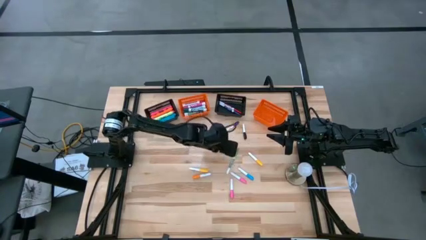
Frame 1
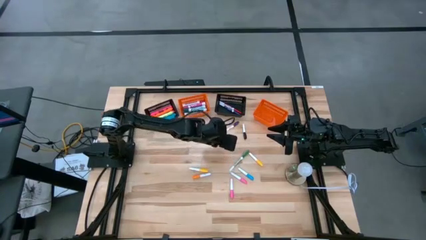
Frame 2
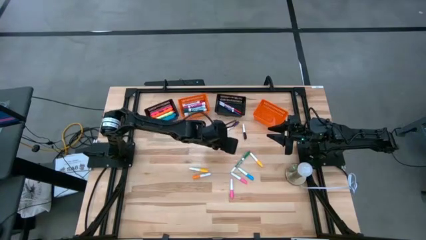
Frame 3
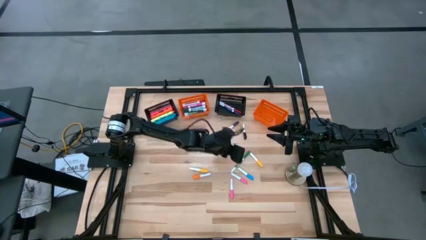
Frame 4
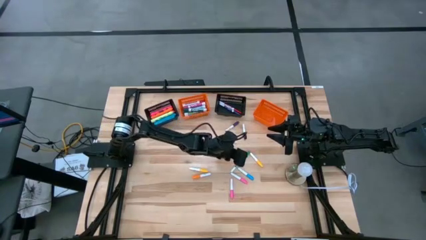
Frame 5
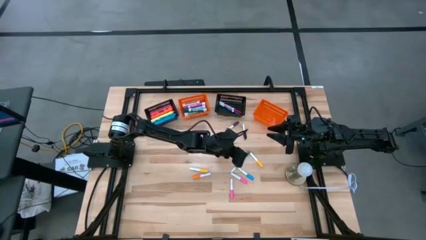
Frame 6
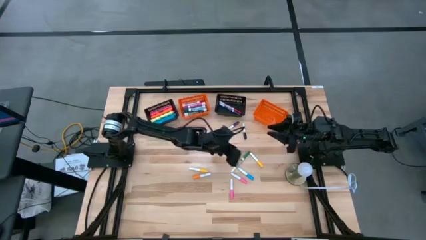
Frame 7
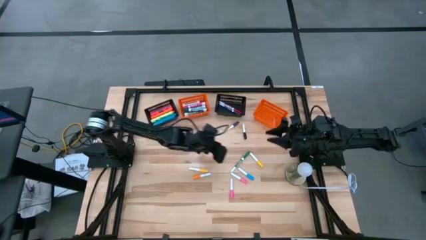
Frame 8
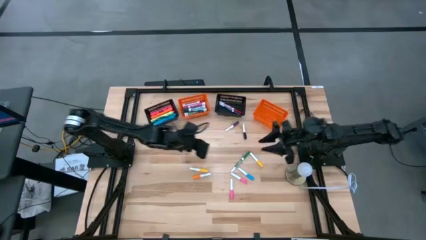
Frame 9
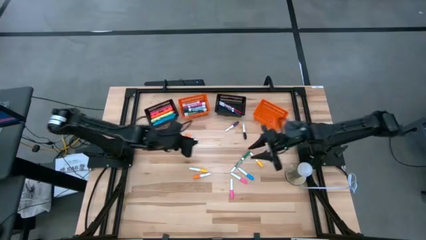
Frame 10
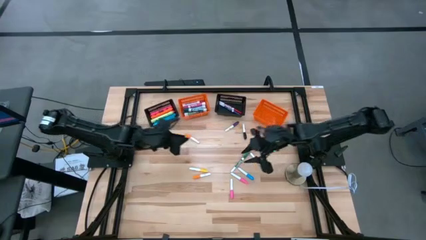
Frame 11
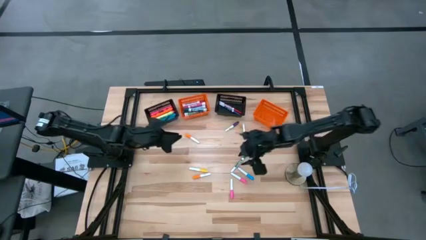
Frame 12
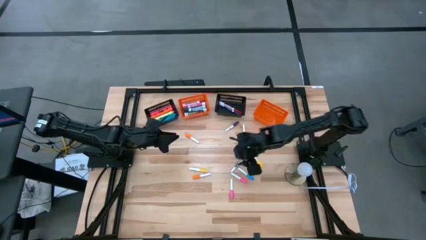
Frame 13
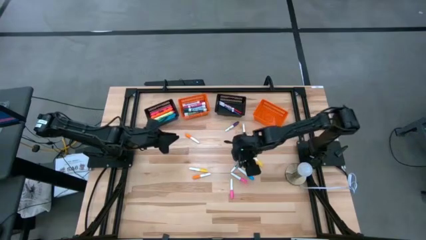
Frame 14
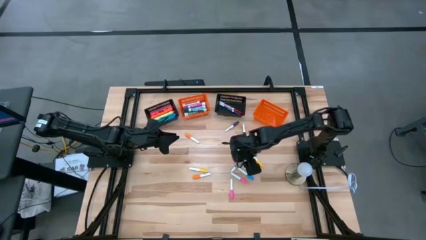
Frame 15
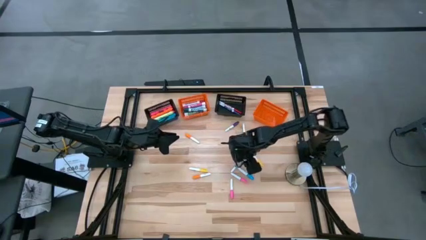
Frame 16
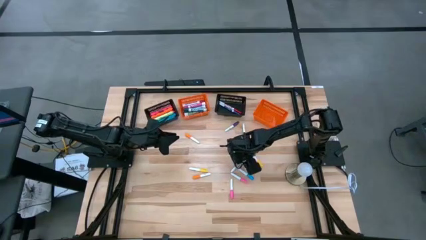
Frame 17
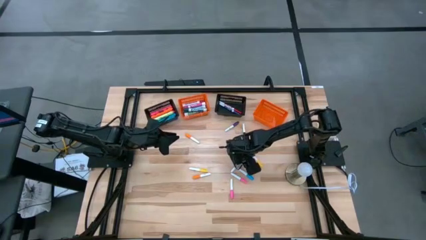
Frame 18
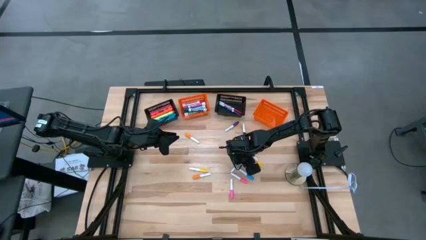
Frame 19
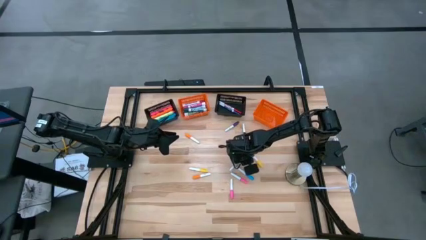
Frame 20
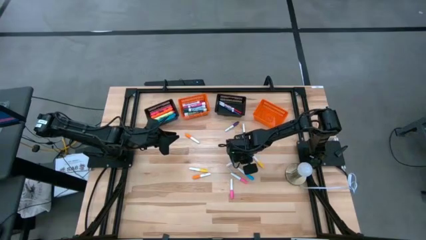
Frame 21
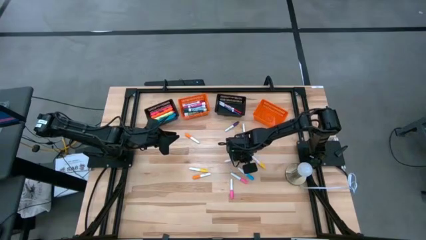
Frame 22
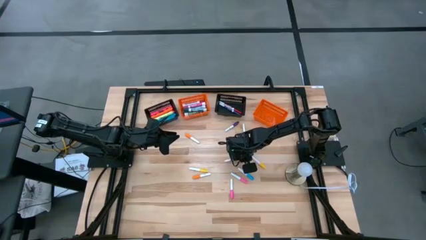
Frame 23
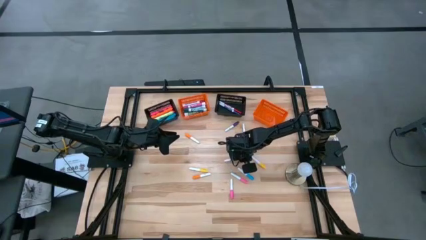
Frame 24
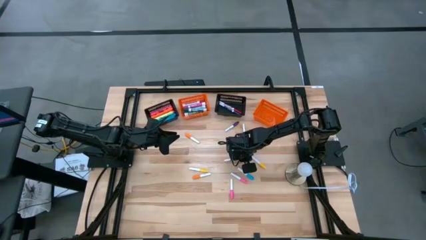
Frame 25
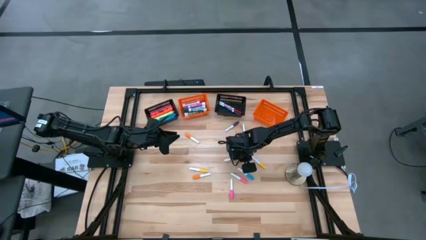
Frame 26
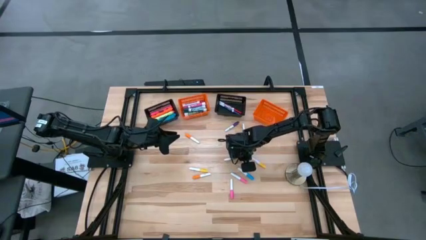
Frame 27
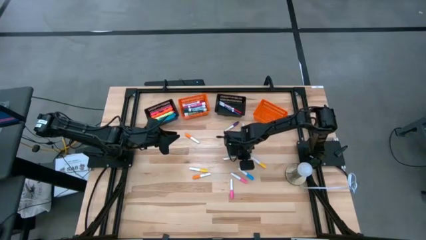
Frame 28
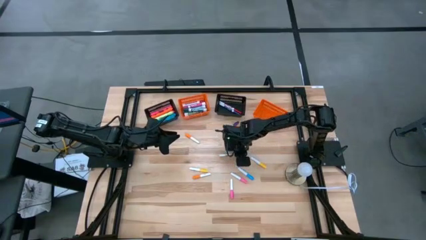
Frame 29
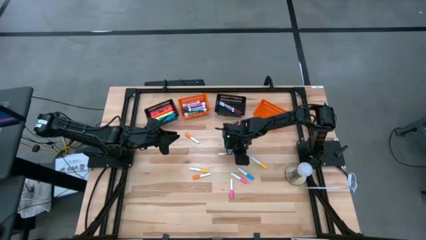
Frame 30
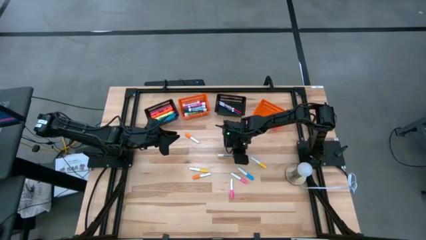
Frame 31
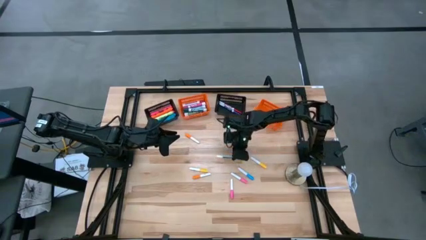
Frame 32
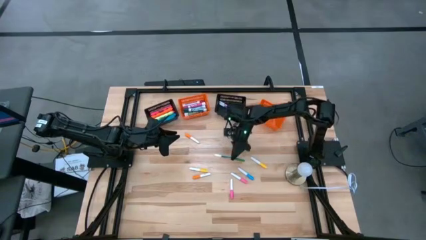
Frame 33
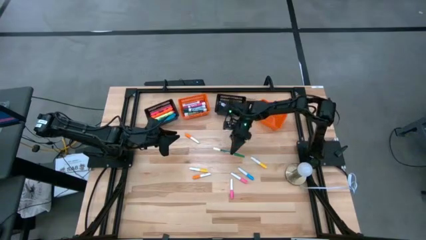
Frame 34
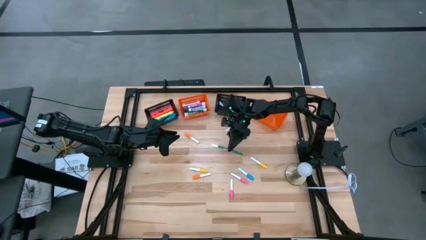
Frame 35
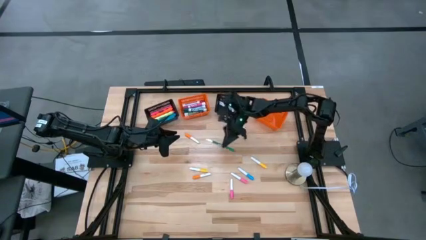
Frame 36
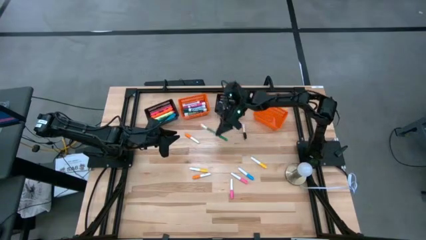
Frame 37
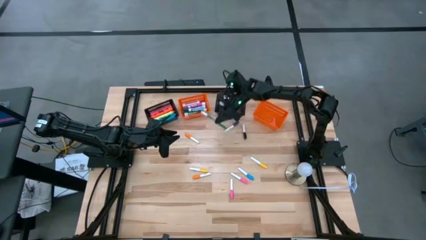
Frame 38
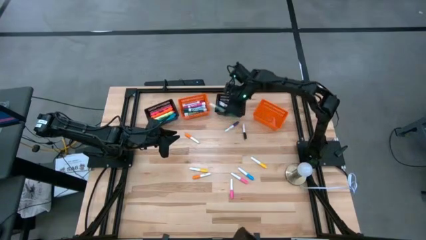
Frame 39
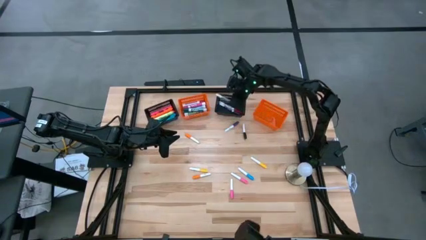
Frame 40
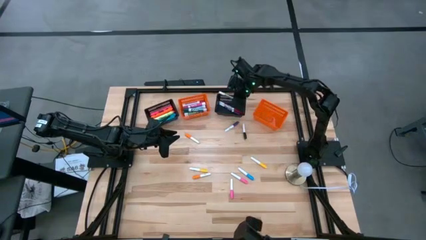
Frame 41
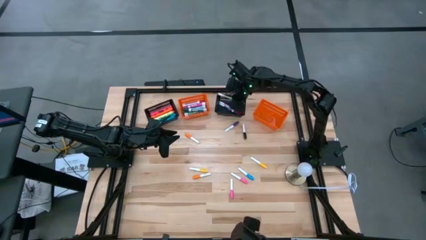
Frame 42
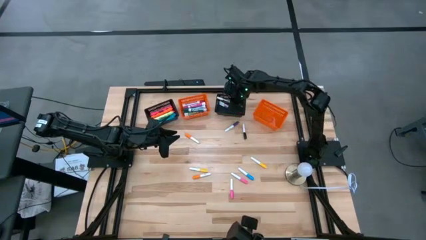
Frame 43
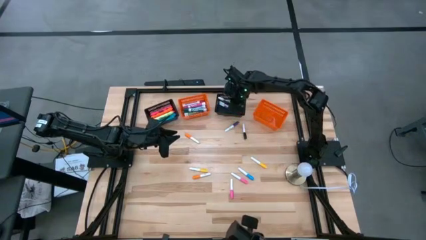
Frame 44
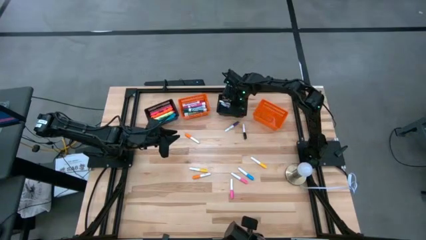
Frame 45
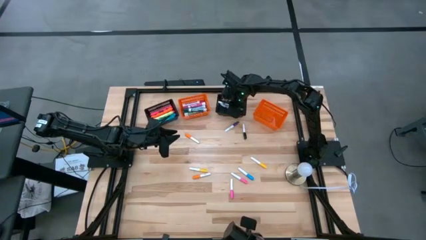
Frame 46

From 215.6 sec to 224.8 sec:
Task: Pick & Place Markers
Put the green small marker pen into the right black bin

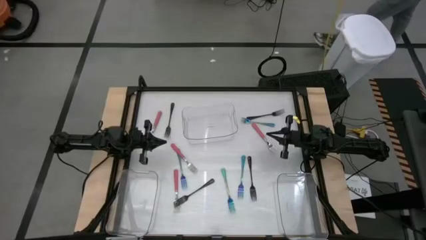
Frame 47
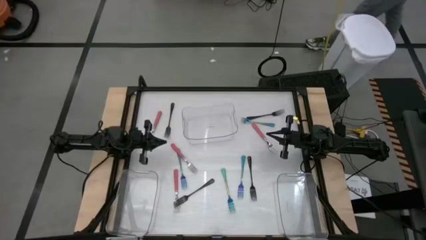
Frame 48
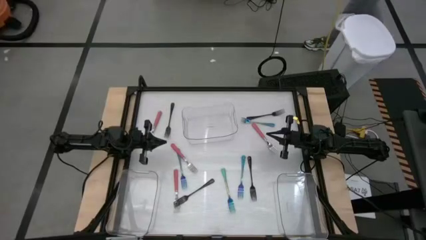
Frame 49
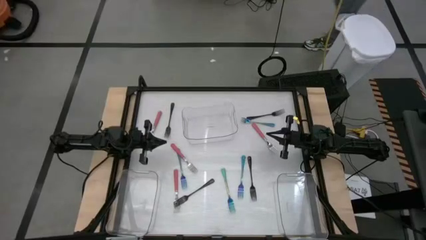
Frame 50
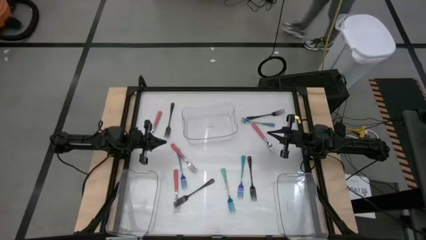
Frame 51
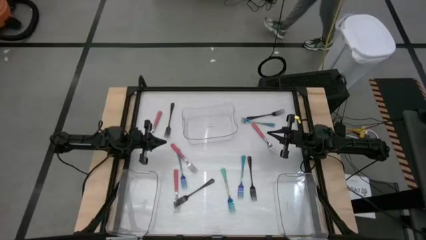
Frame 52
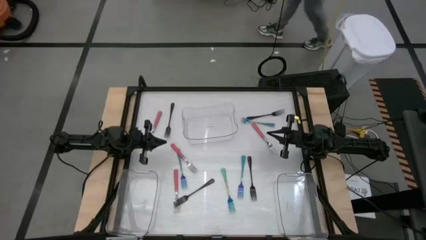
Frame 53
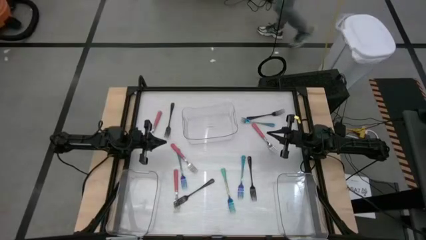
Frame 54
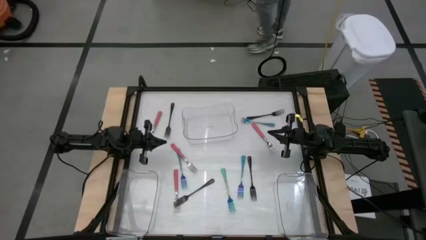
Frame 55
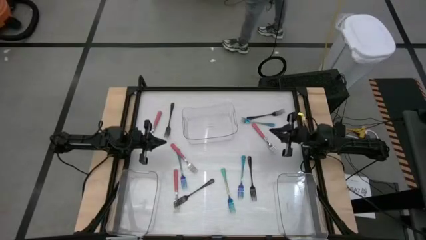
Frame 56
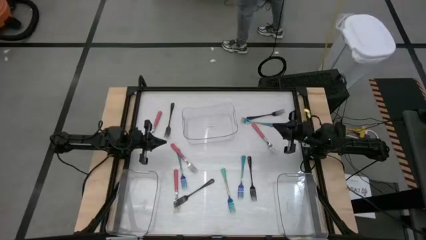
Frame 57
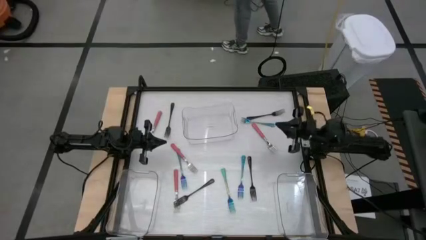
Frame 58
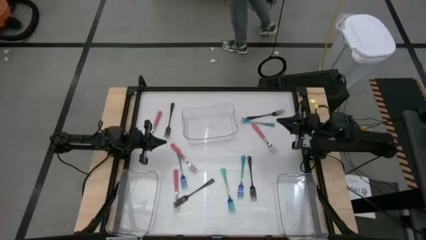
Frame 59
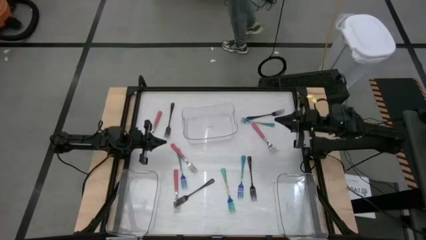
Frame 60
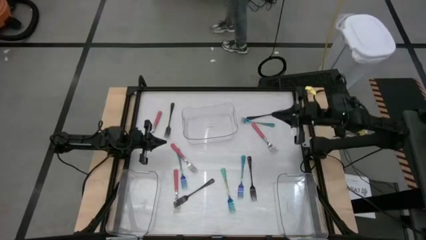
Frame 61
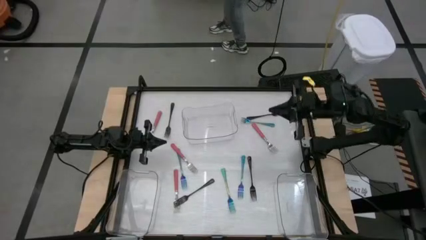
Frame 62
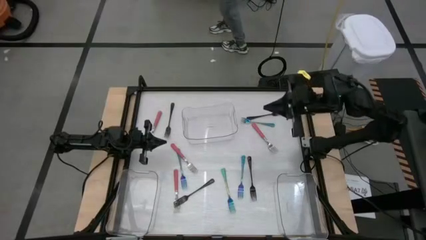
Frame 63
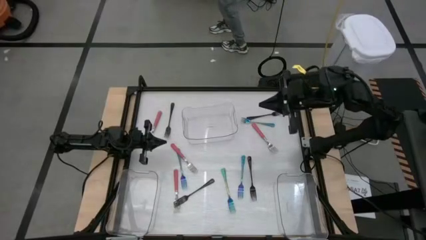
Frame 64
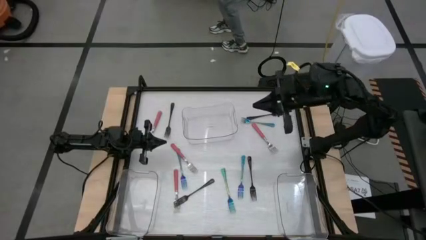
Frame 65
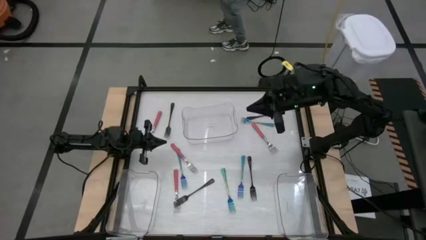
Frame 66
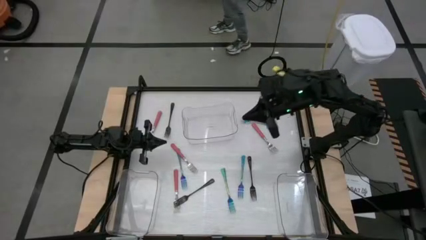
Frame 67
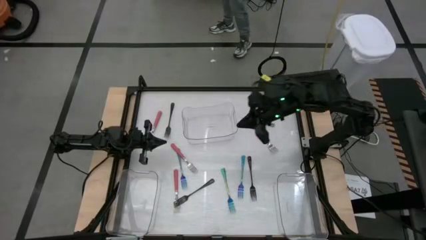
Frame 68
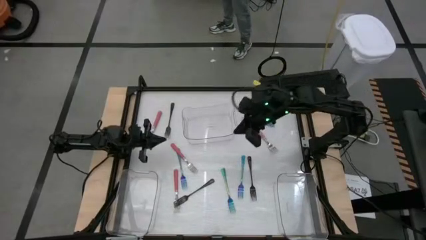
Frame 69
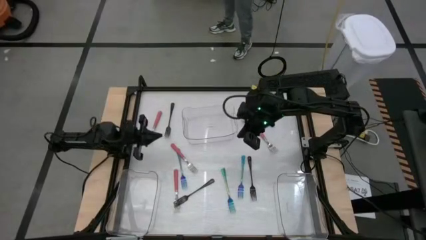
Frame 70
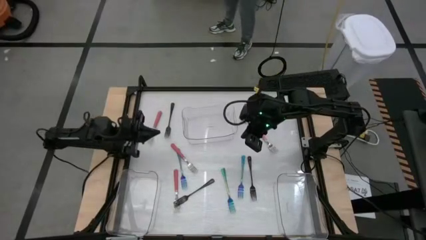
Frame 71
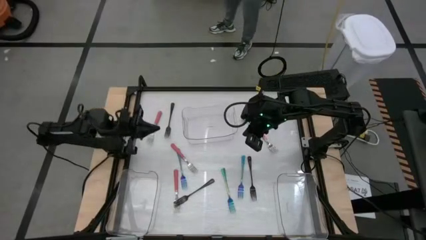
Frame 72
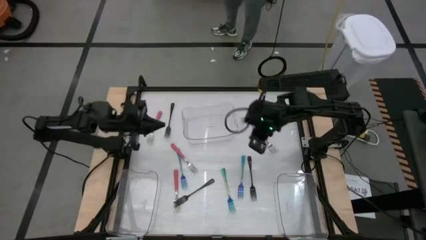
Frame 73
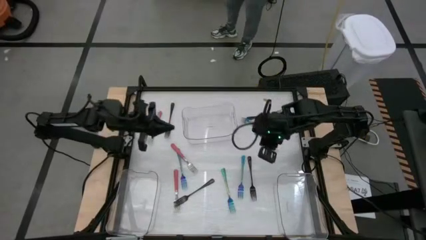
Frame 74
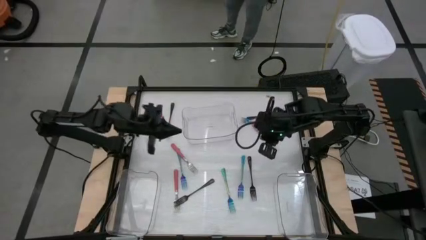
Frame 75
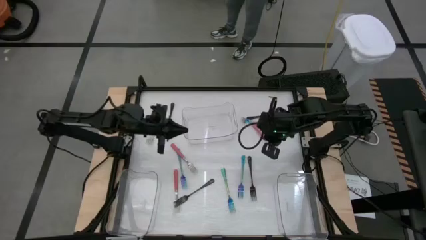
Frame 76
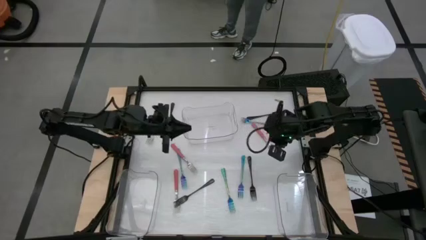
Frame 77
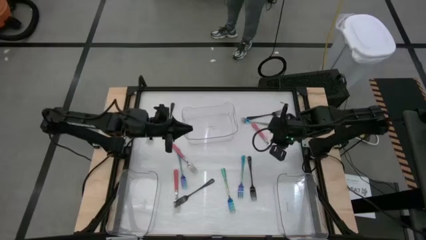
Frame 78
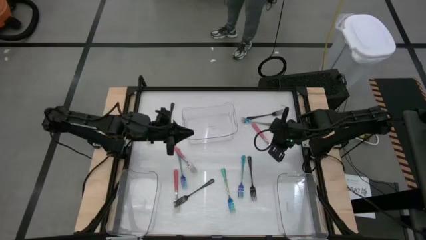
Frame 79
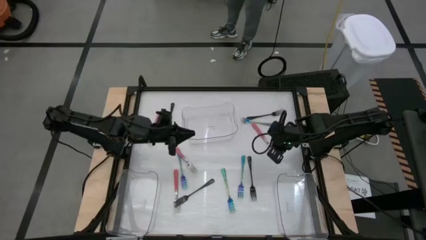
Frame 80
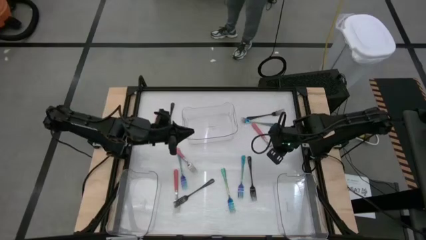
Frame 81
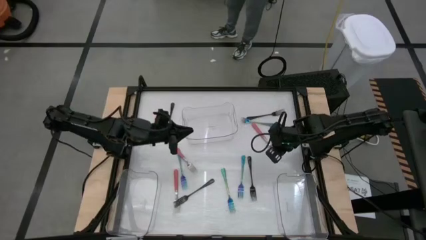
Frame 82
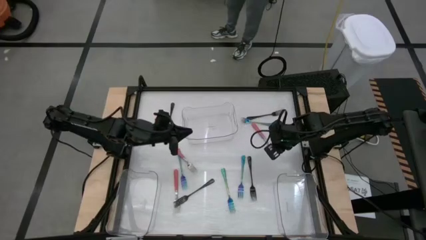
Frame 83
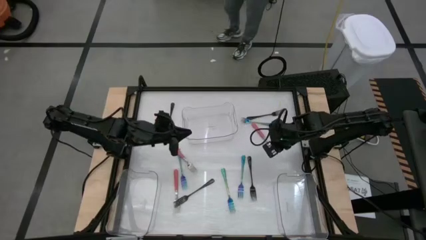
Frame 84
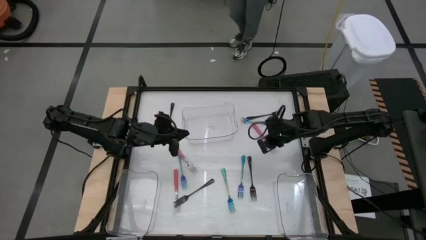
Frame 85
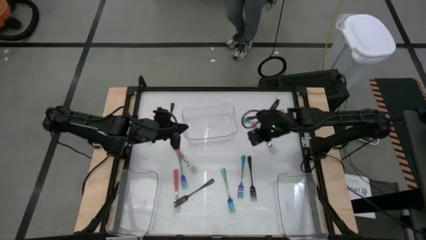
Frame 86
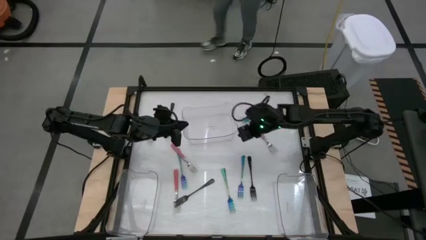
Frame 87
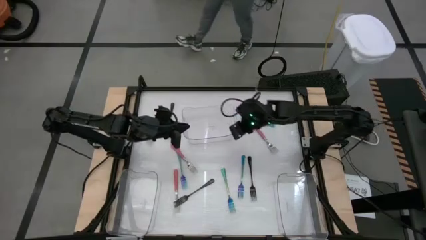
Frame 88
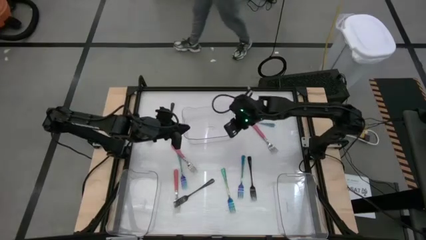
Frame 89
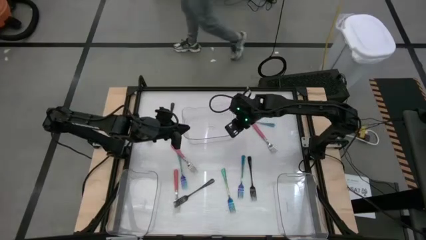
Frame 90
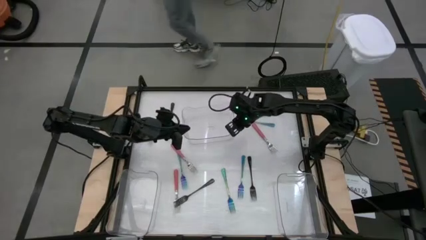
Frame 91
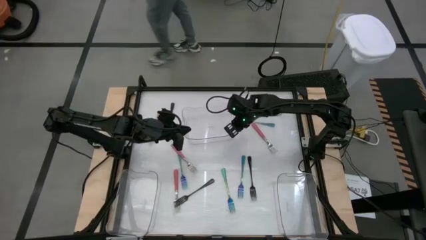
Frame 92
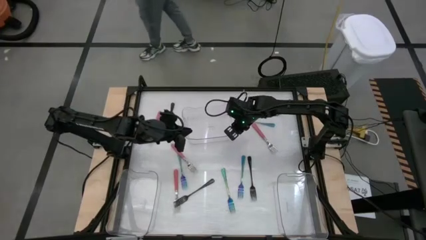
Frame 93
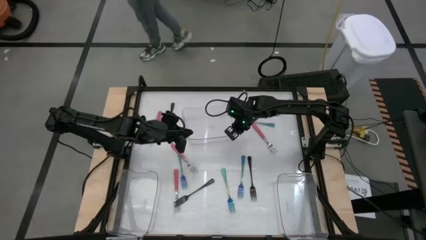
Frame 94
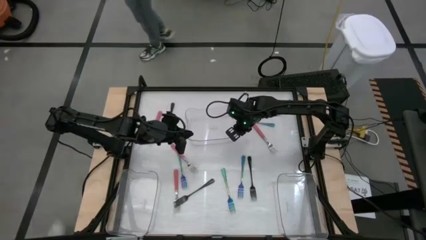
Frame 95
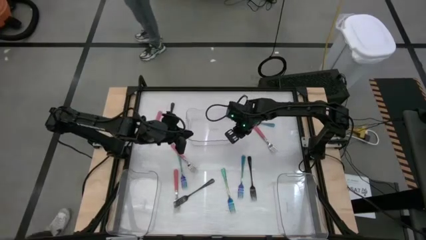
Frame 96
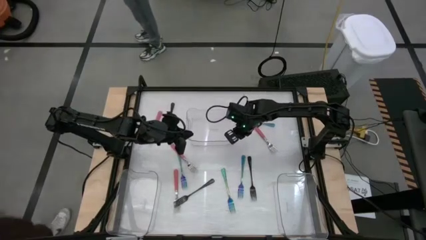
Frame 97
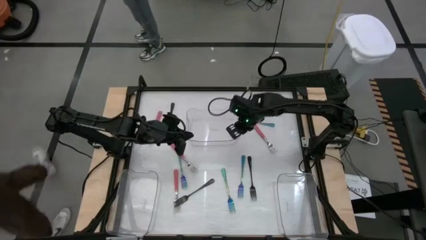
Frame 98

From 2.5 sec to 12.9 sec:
Task: Sort silverware by color (type)
Prepare the middle transparent bin
